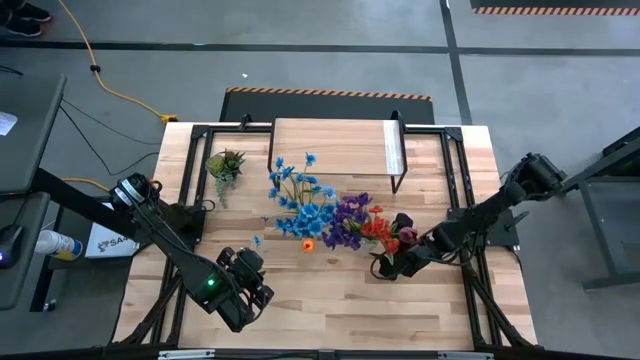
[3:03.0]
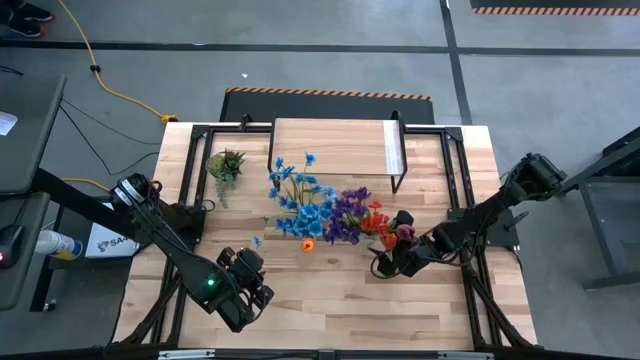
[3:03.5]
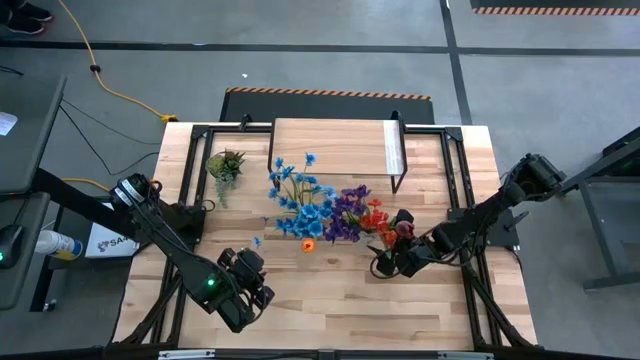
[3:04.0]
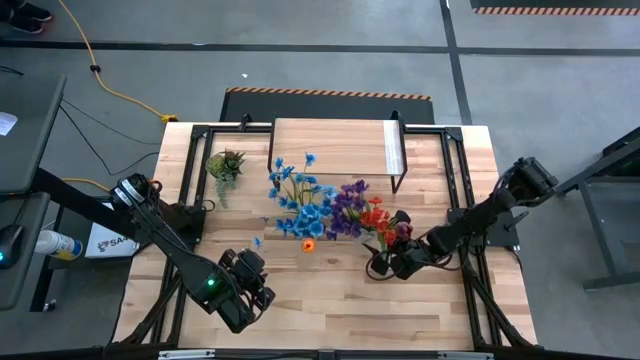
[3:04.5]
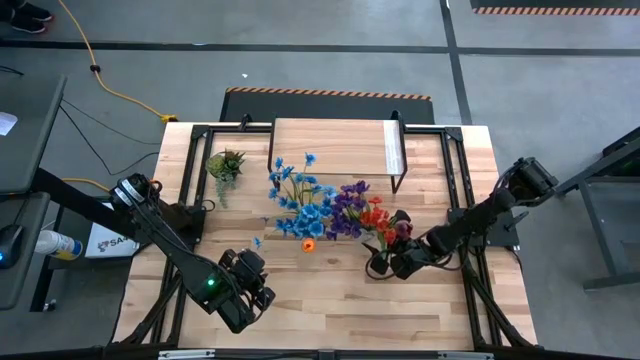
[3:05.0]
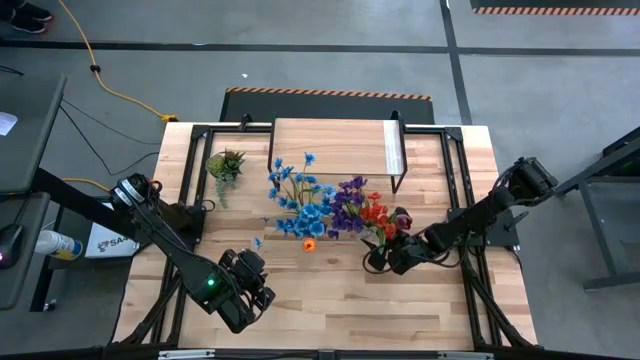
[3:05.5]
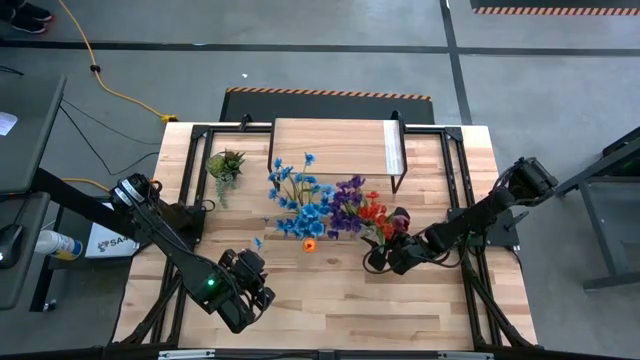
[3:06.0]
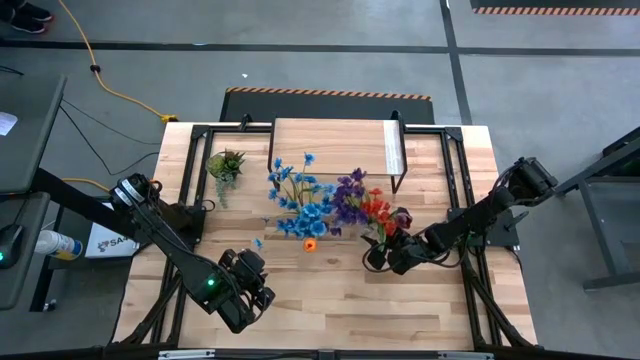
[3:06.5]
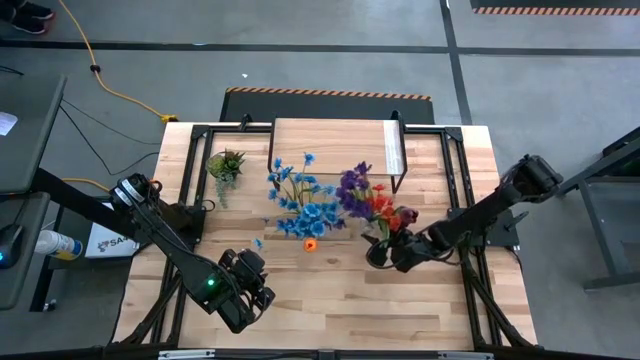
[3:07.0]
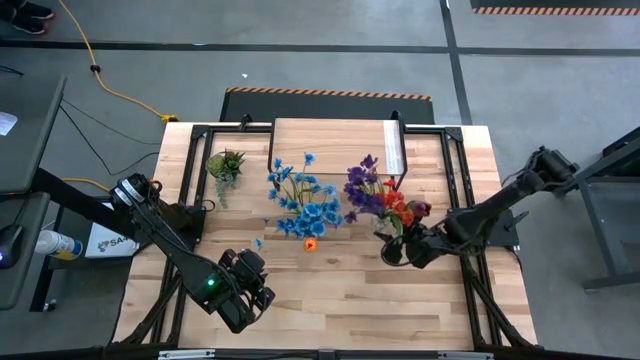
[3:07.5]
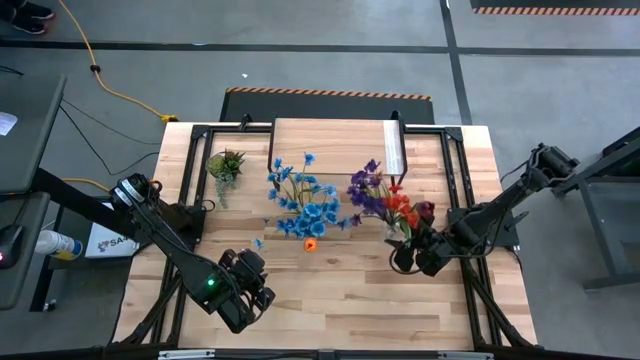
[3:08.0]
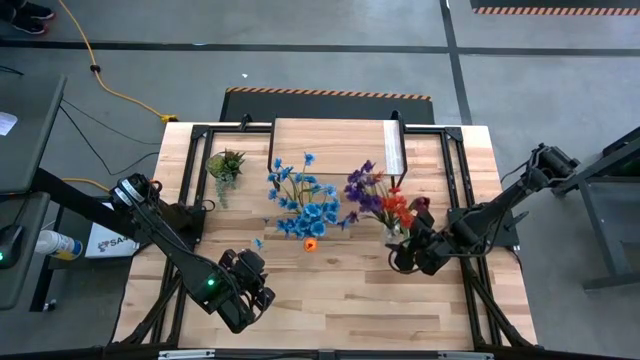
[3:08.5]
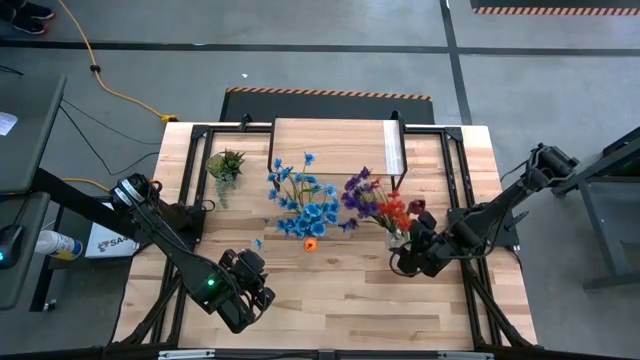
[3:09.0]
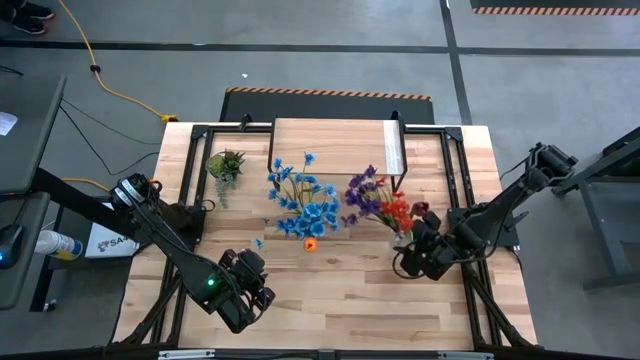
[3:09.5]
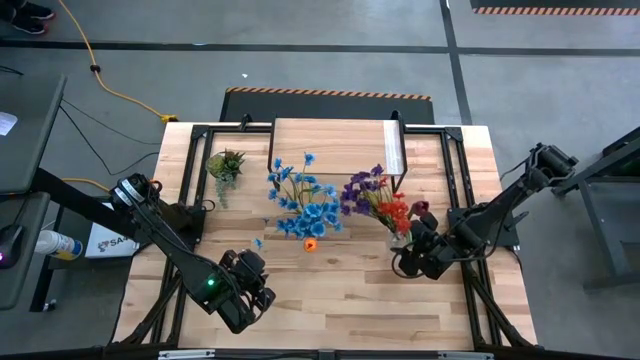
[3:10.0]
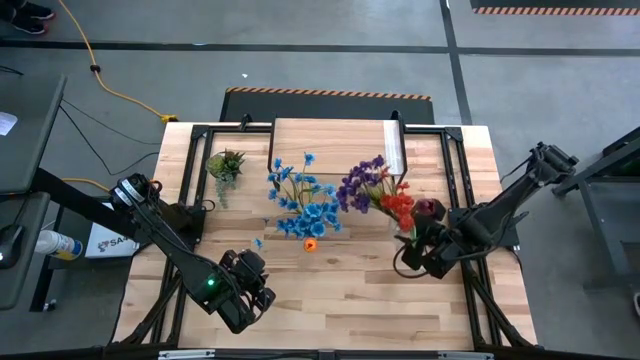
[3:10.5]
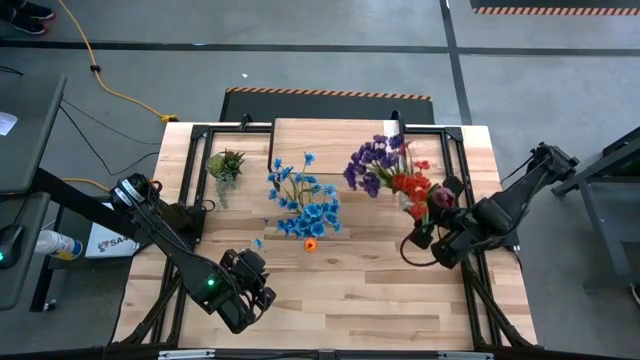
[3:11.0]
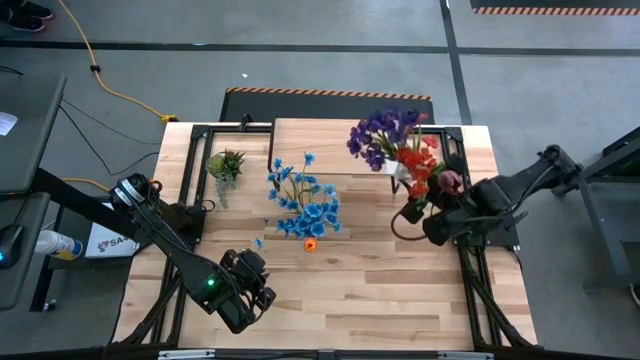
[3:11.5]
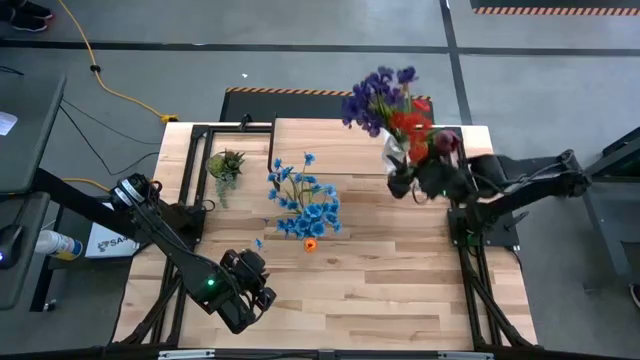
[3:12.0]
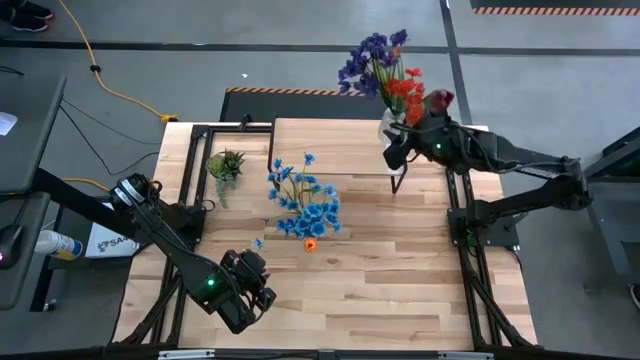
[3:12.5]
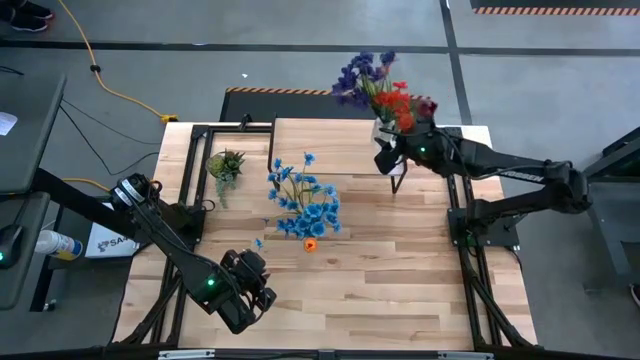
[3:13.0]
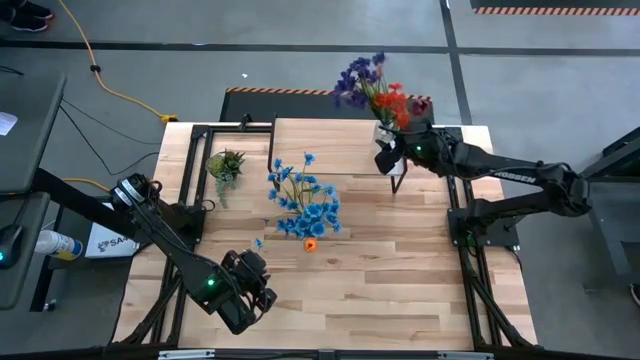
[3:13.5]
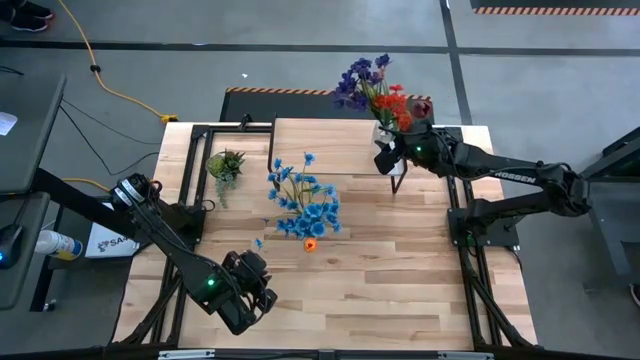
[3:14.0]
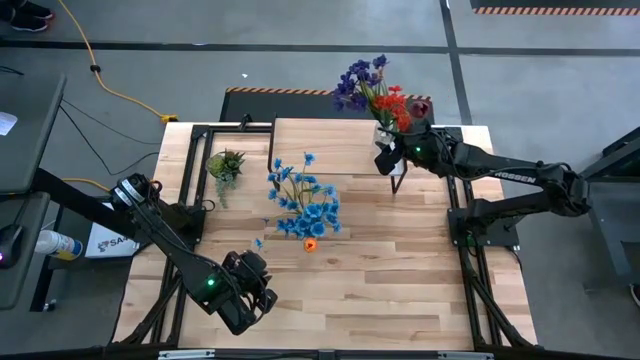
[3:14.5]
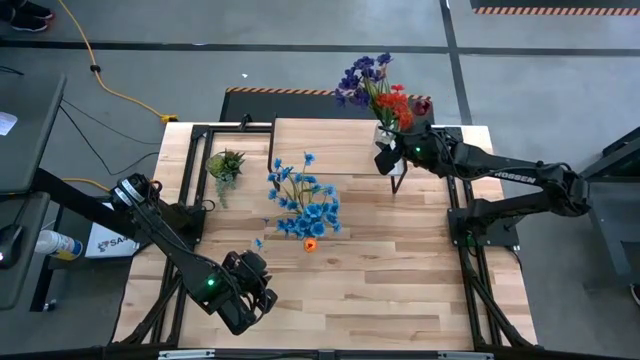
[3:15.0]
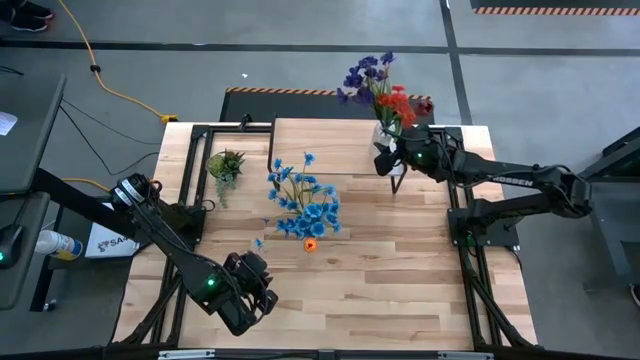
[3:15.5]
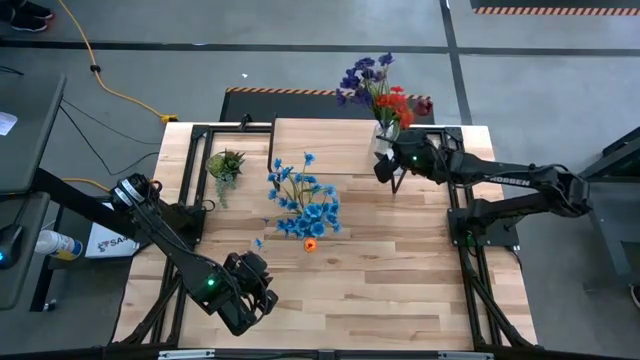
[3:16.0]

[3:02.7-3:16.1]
Task: Pick and place flowers into a vace then onto a shelf
Put the right transparent flower vase on the shelf

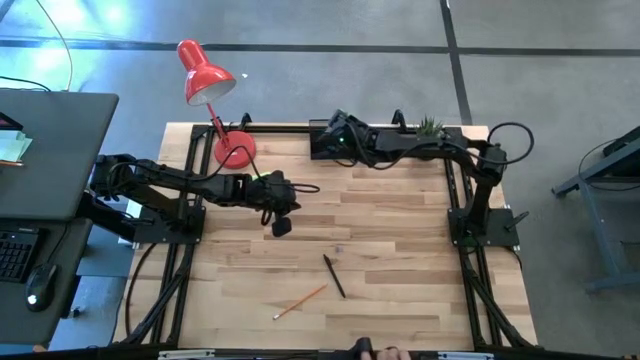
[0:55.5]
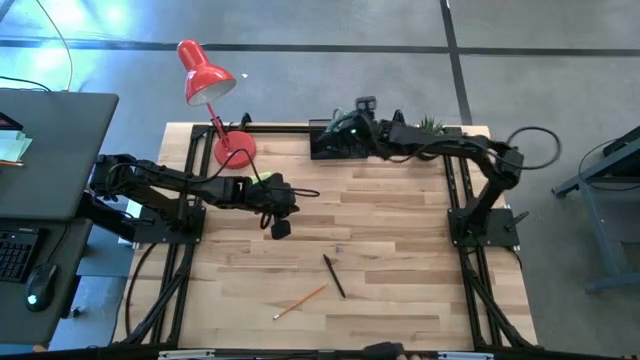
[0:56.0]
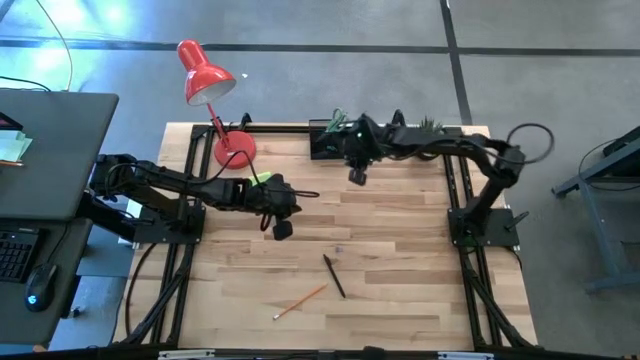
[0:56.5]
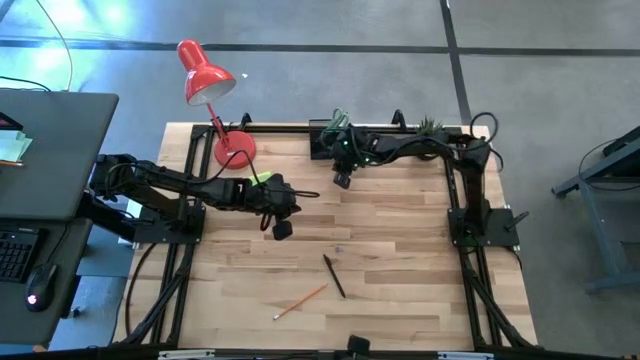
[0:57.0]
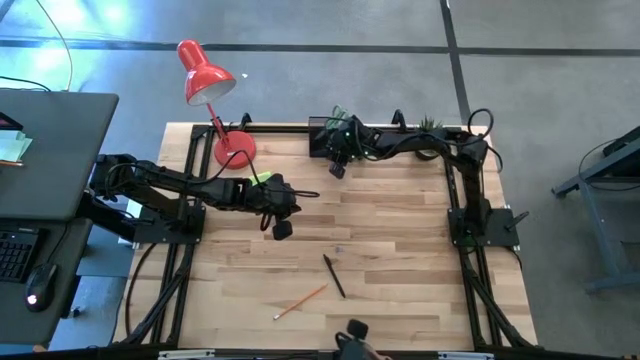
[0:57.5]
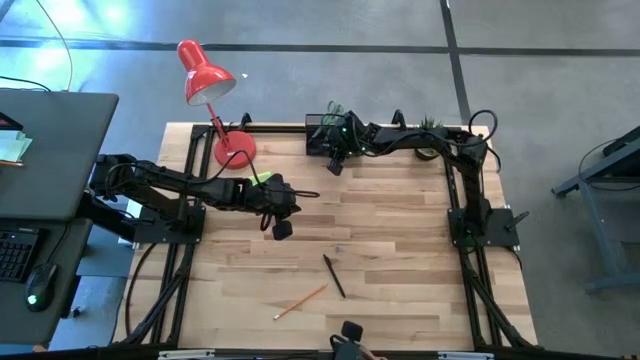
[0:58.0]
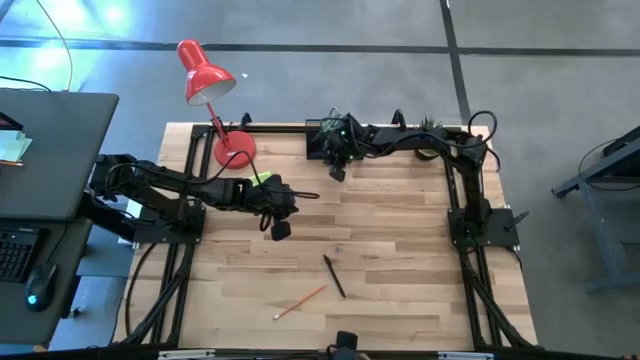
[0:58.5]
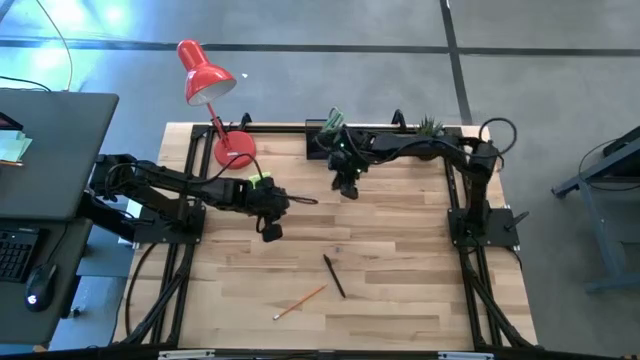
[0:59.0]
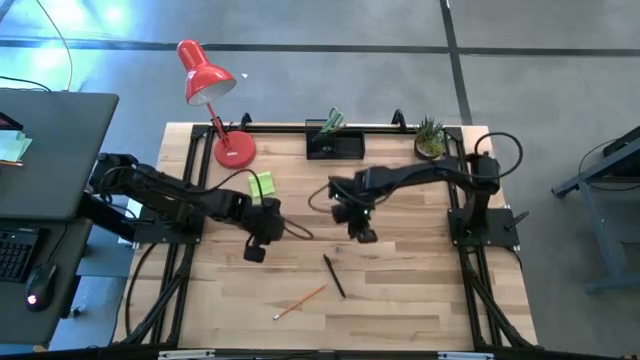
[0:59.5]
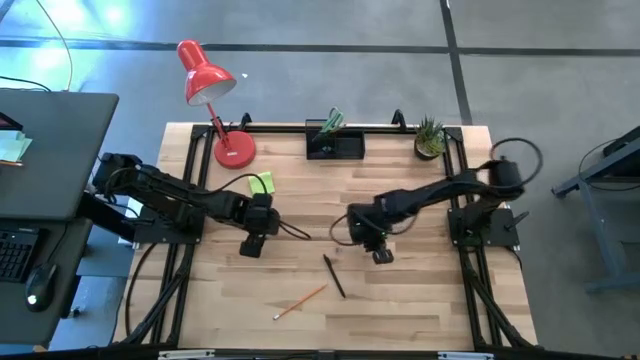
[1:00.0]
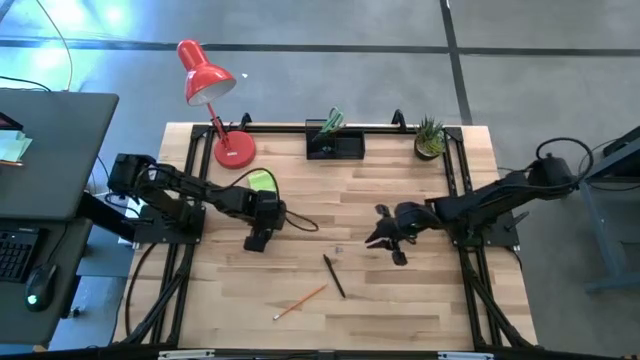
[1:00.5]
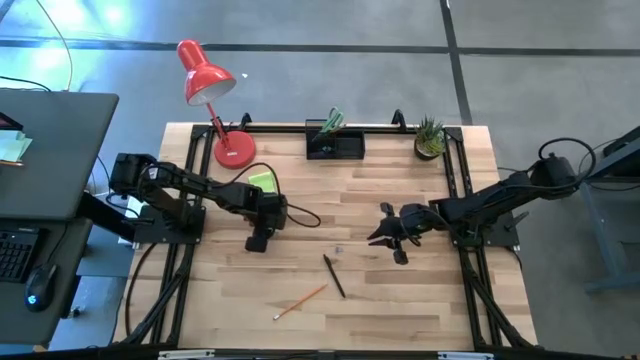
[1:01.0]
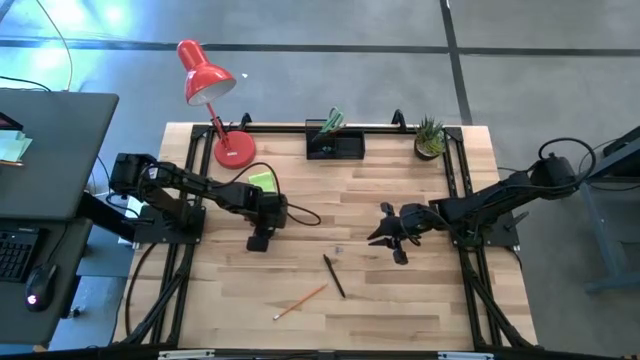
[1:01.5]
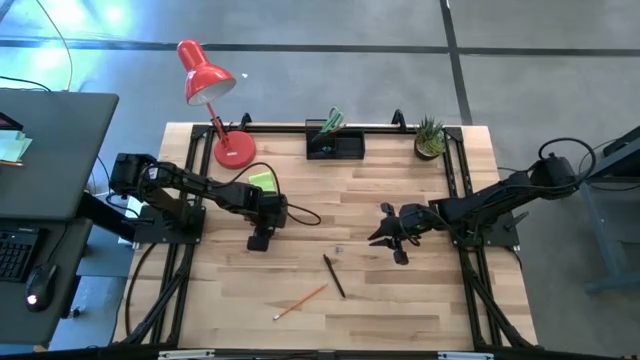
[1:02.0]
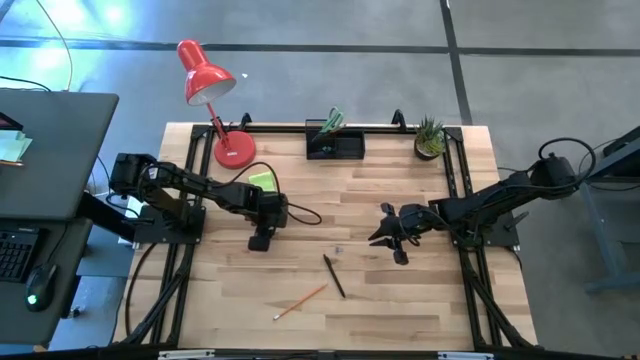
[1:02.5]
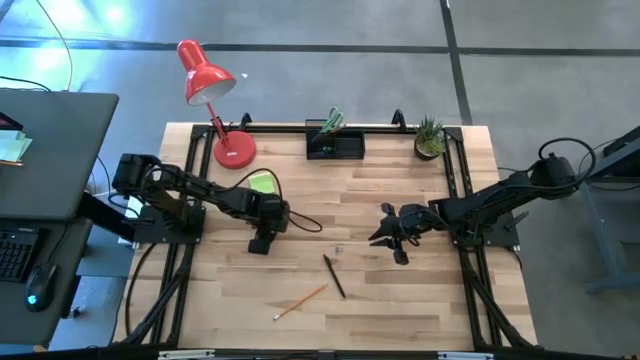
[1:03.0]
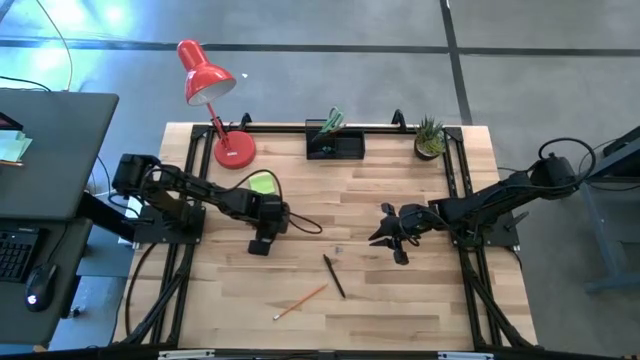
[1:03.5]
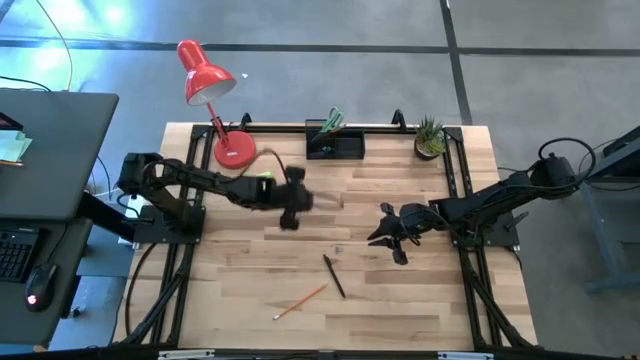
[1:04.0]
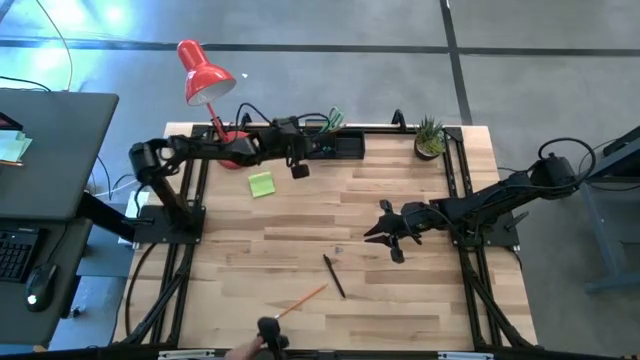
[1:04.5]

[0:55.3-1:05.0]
Task: Pick and place office supplies into organizer
Put the pink binder clip into the desk organizer
